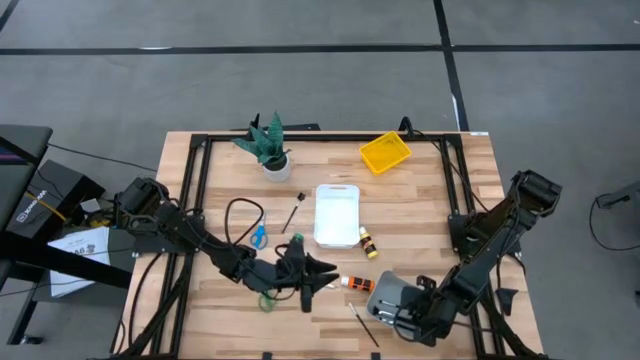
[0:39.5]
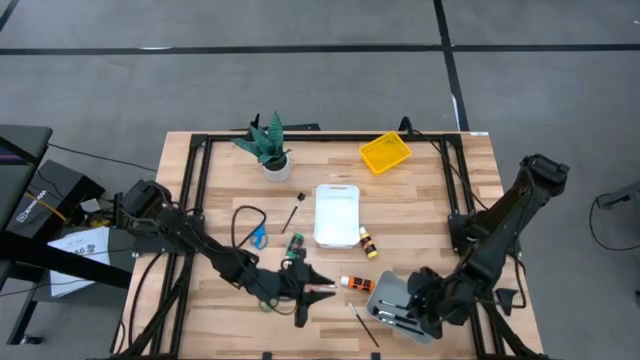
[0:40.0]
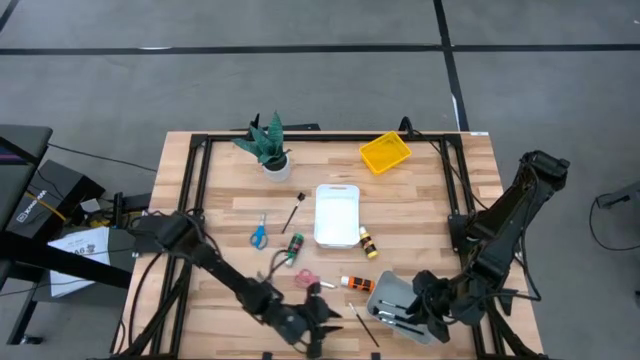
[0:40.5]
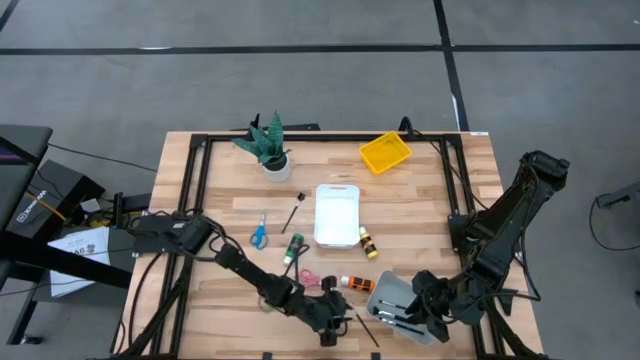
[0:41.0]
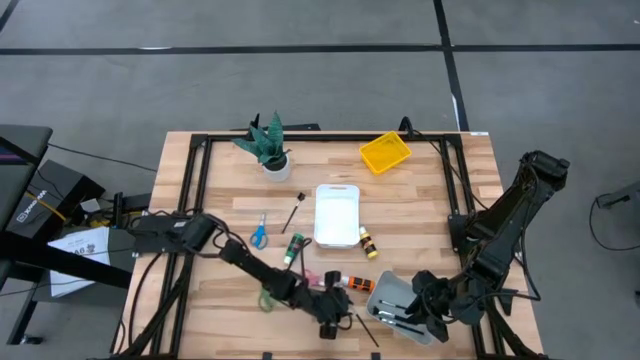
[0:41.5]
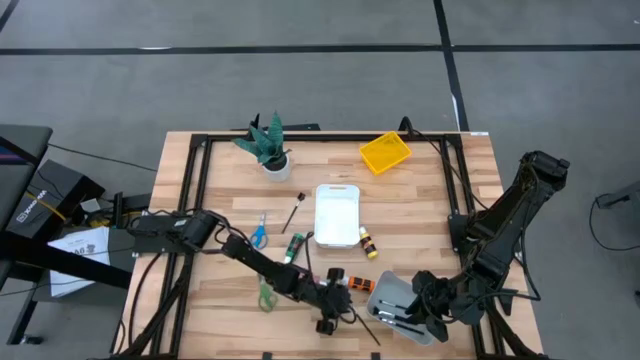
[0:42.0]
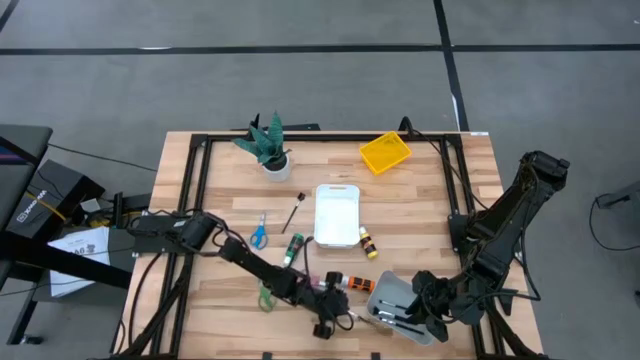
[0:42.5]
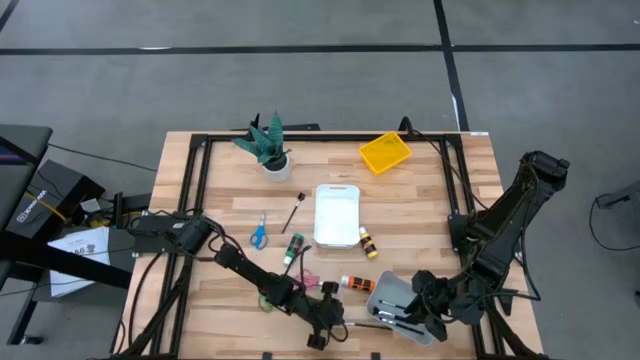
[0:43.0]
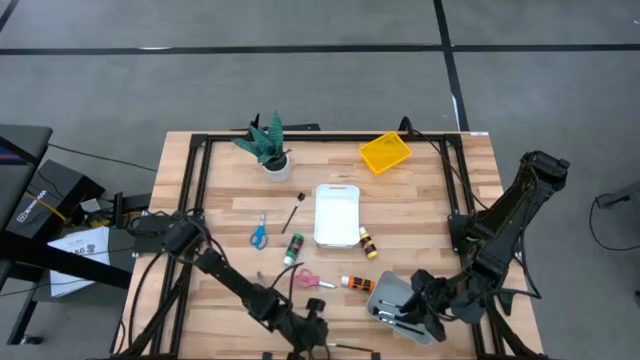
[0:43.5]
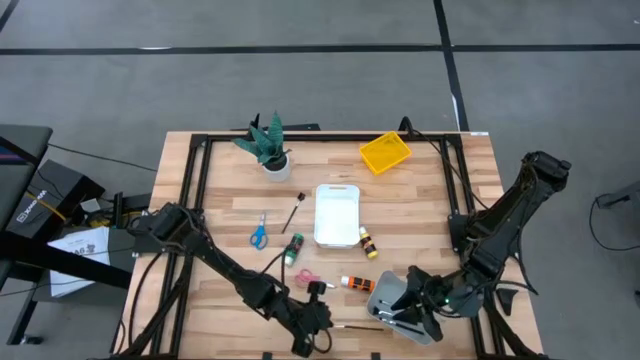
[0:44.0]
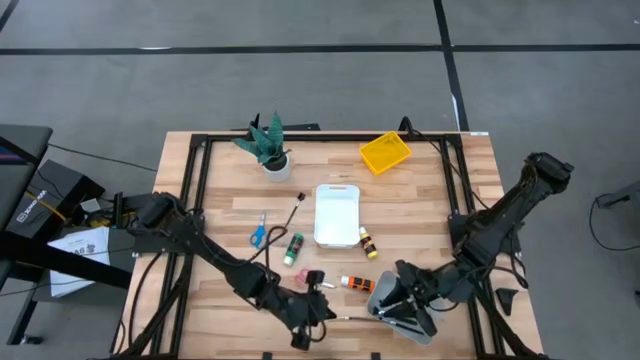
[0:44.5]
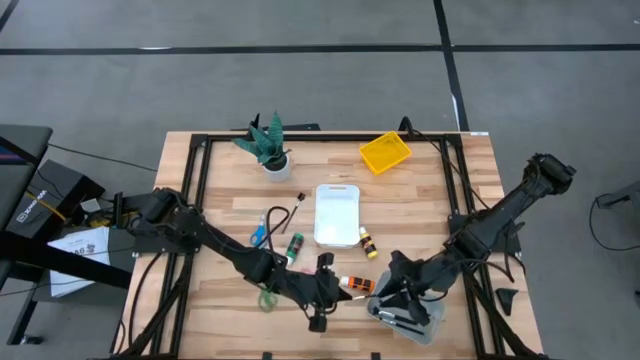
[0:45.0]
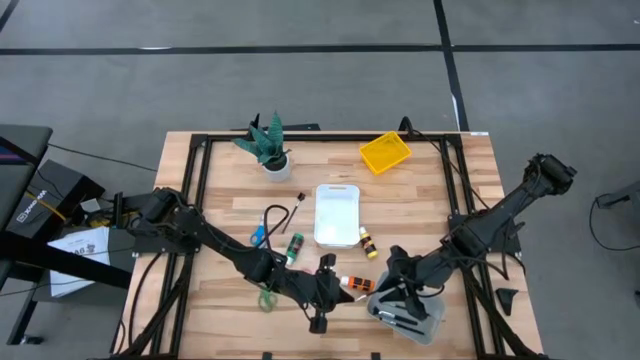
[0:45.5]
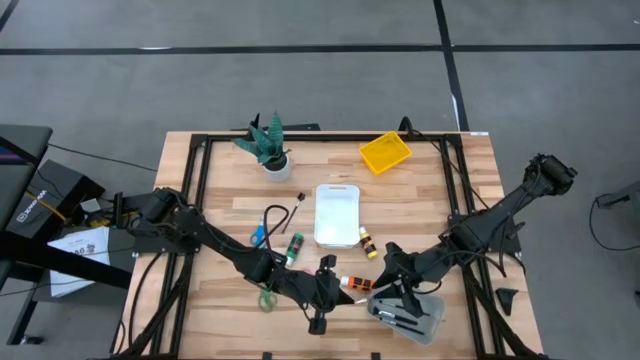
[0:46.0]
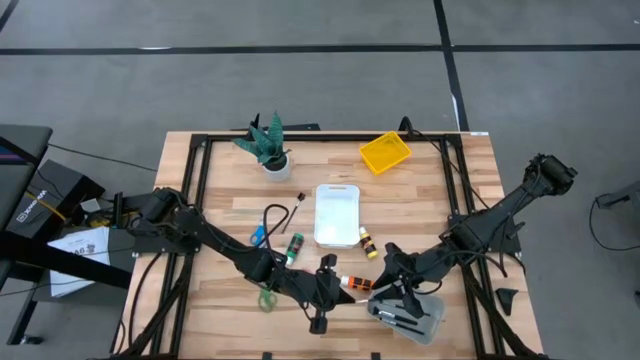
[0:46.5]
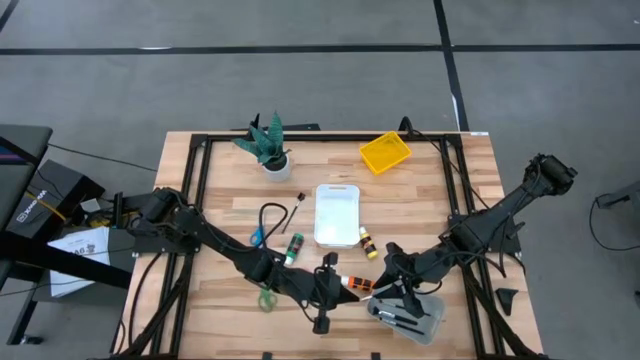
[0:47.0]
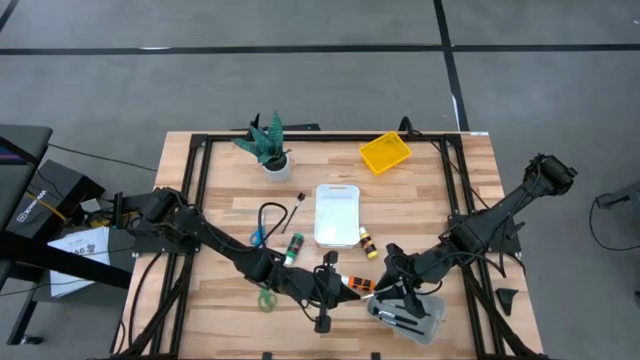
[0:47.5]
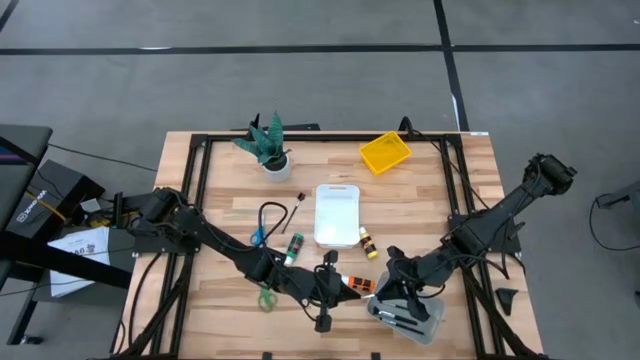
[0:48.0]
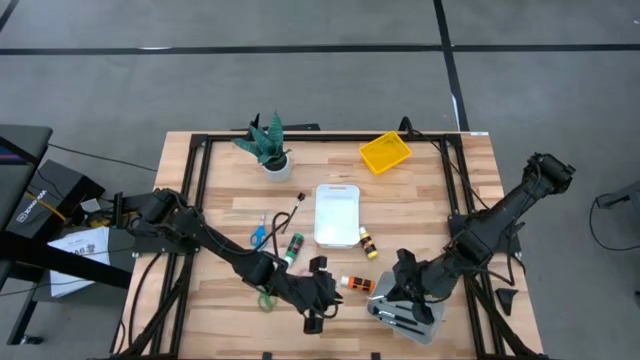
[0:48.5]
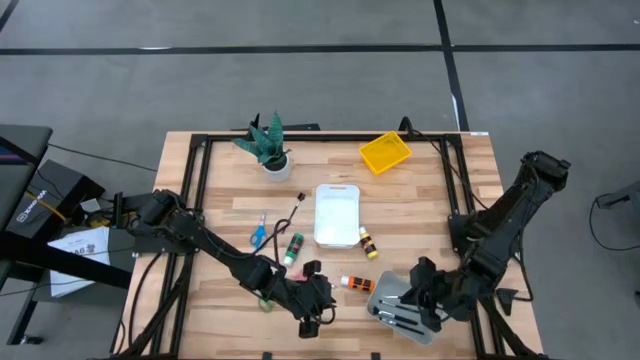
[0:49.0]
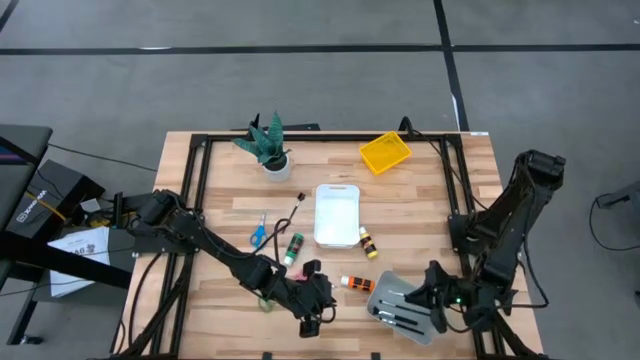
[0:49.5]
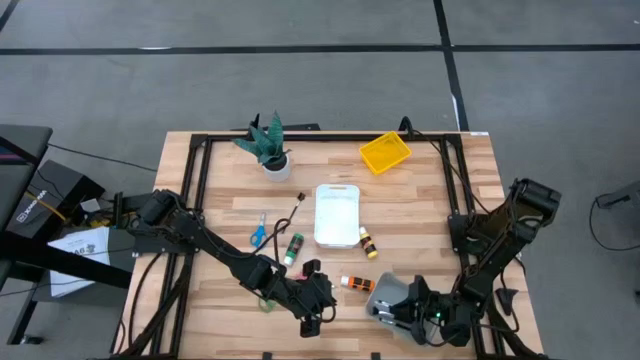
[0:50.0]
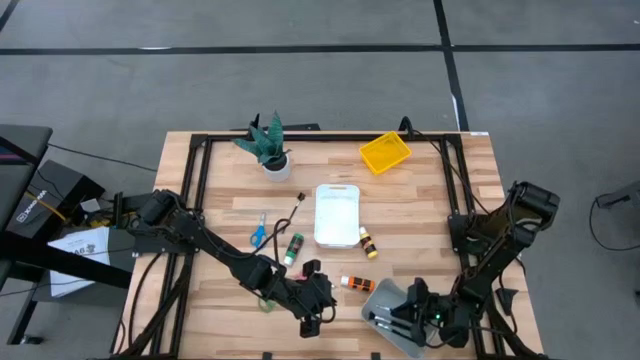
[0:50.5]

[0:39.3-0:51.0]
Task: Pick & Place Paint Supplies
Put the eyeshadow brush into the gray bin

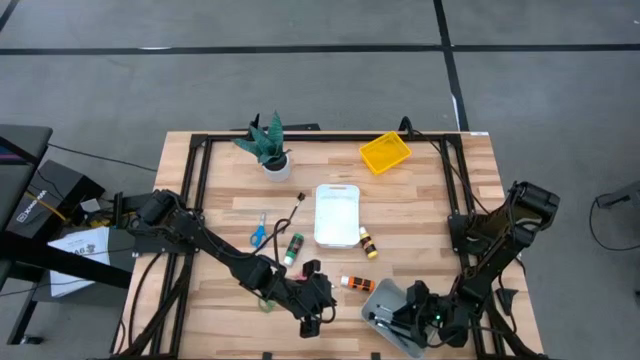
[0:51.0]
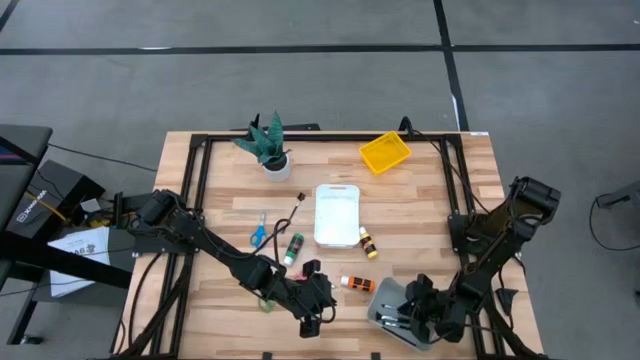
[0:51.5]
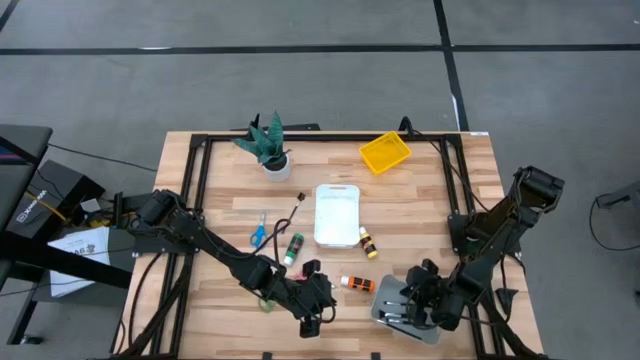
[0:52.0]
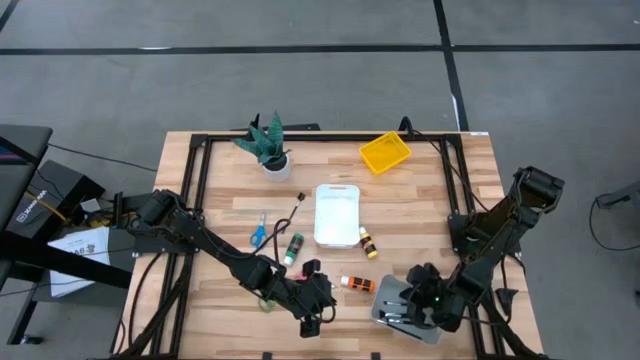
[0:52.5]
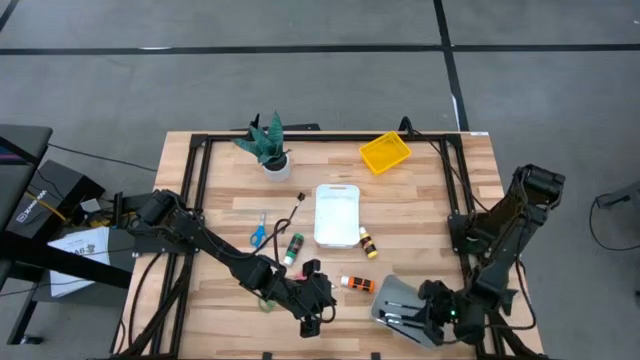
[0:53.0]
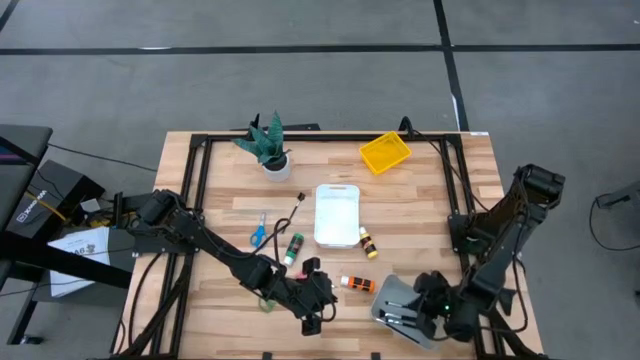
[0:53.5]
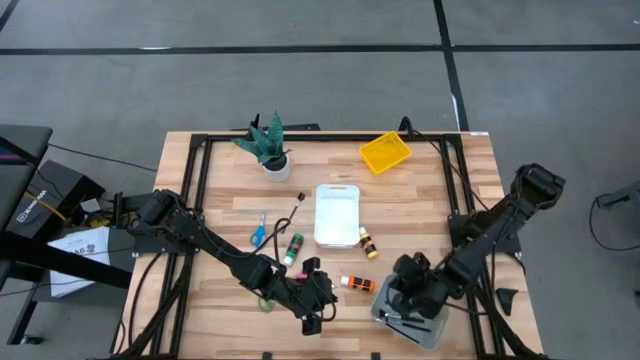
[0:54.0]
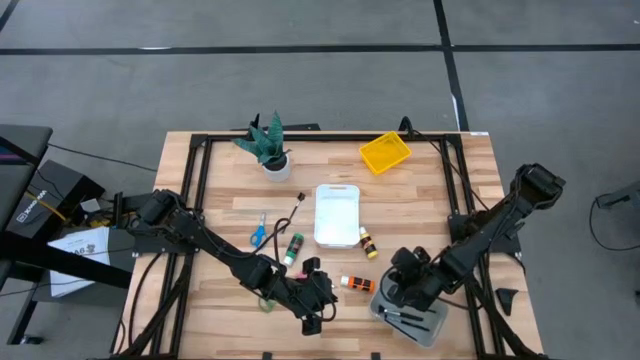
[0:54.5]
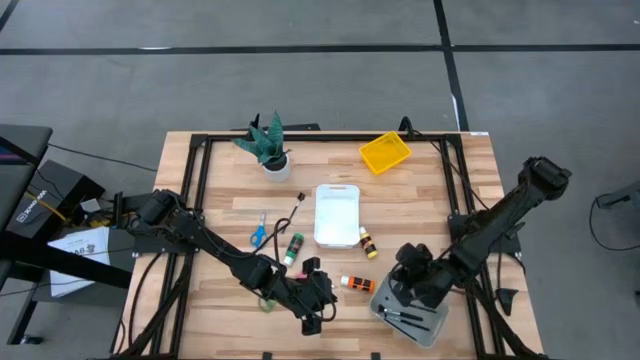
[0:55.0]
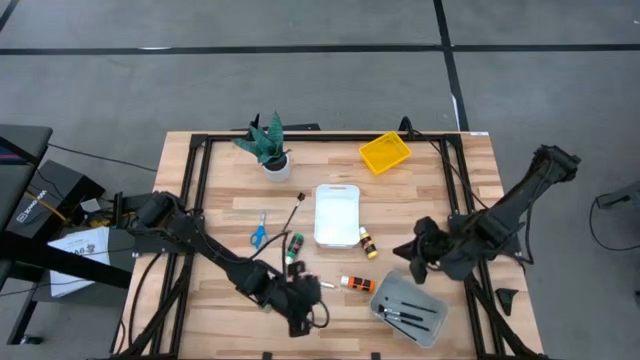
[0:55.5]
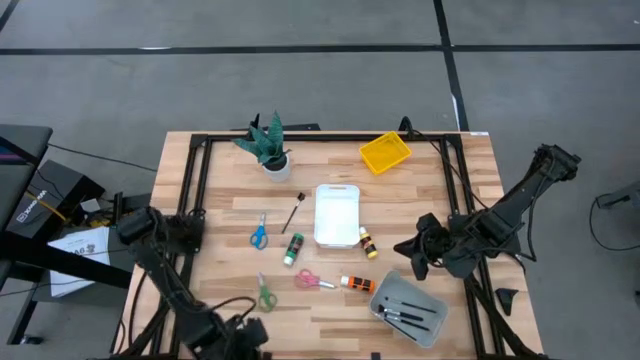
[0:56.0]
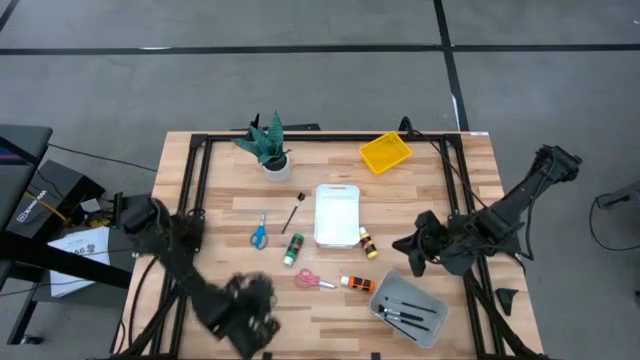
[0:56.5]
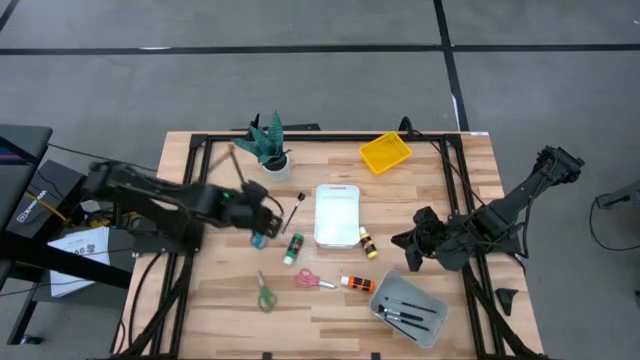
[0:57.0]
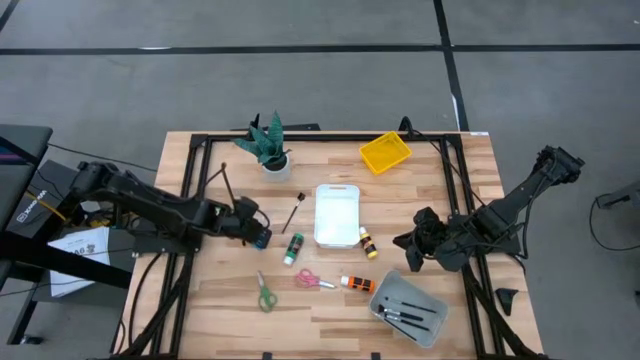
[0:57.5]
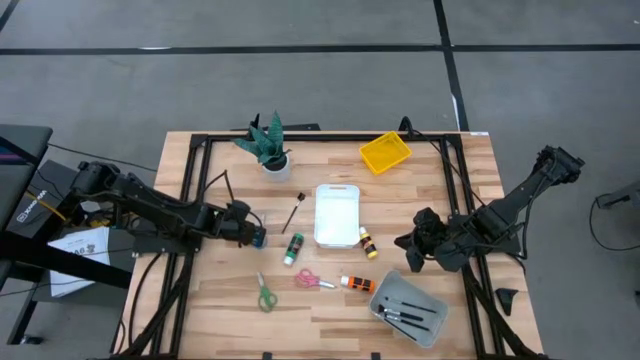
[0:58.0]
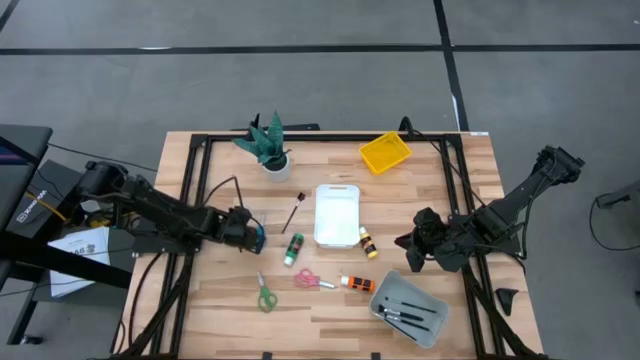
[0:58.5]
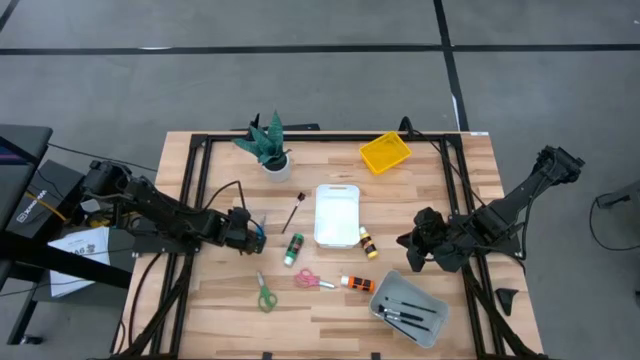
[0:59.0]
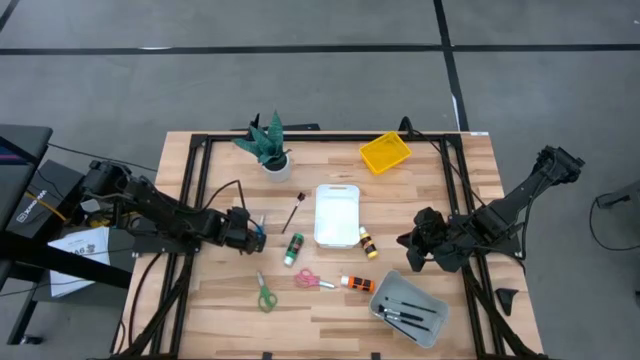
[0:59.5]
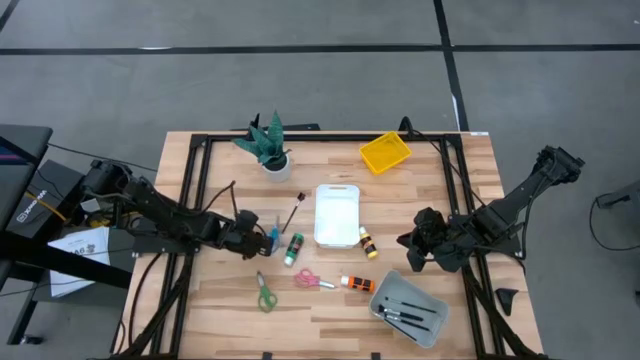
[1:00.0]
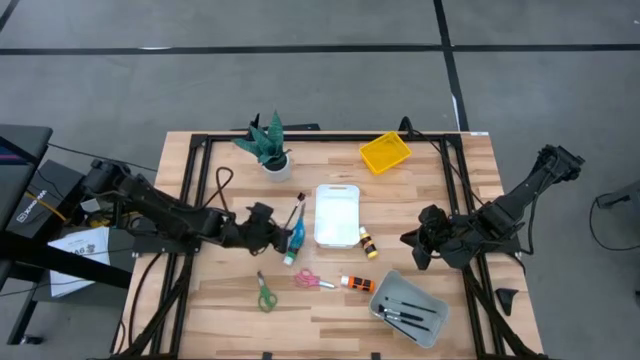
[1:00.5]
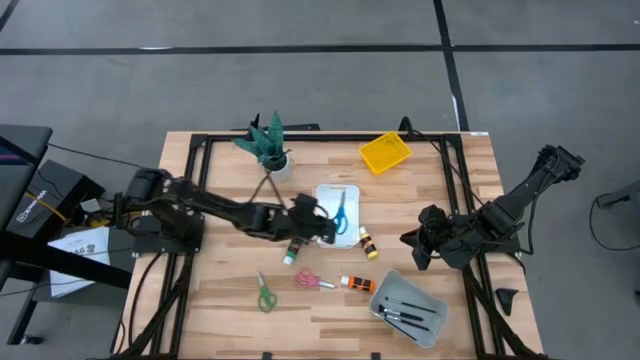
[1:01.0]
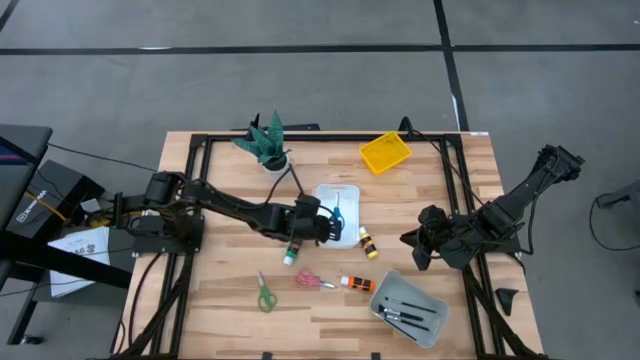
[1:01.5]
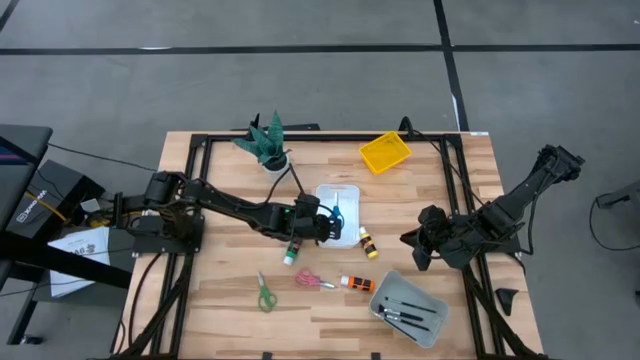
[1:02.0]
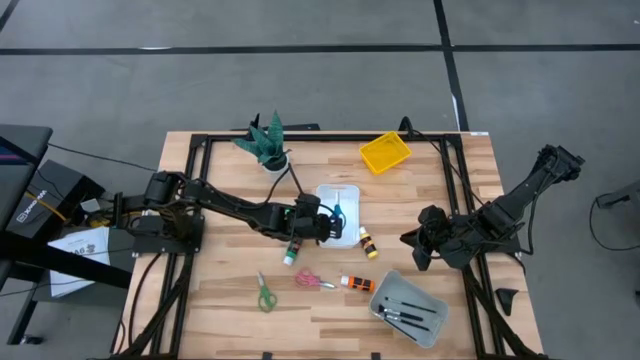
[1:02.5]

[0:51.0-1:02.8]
Put the blue scissors into the white bin
